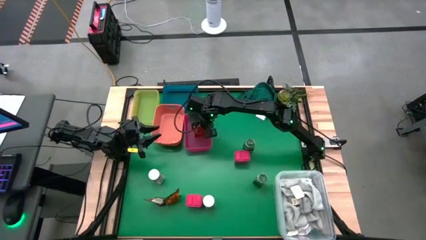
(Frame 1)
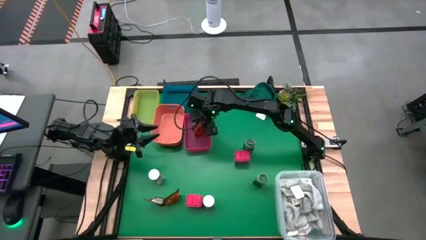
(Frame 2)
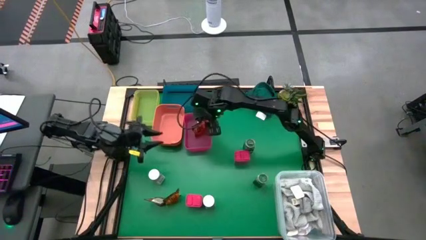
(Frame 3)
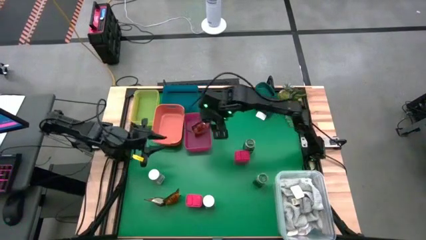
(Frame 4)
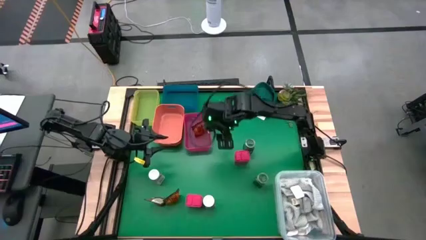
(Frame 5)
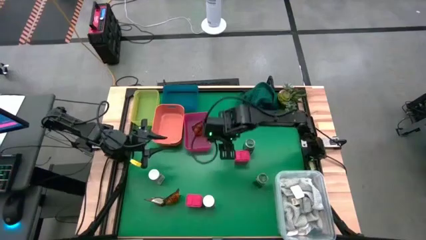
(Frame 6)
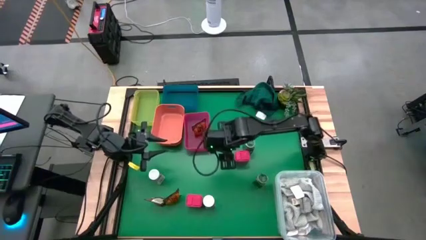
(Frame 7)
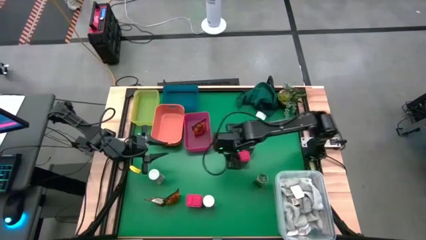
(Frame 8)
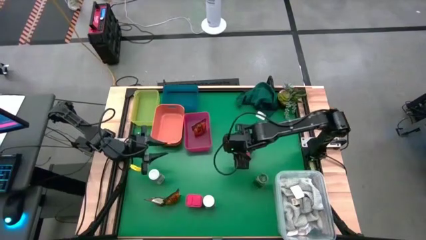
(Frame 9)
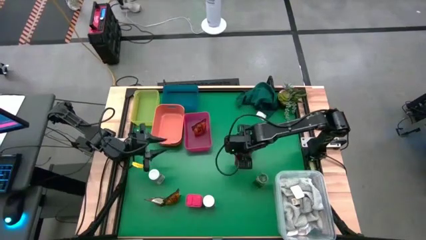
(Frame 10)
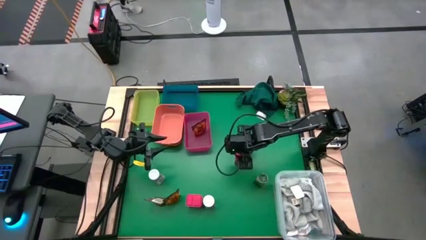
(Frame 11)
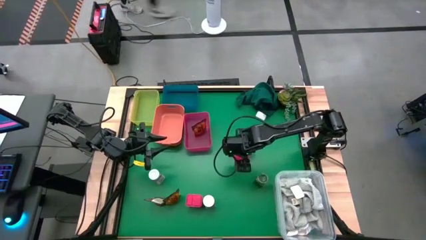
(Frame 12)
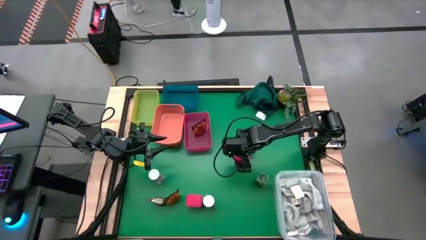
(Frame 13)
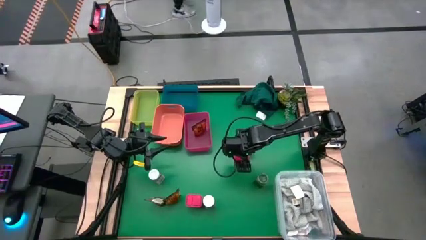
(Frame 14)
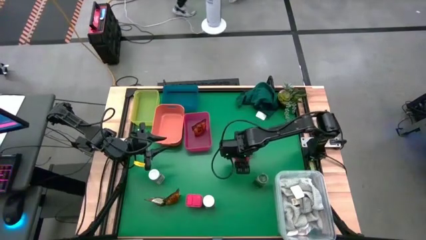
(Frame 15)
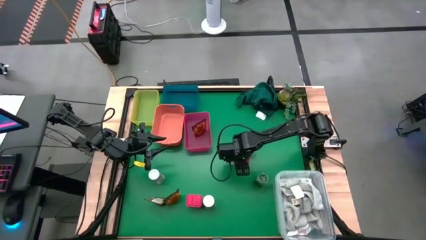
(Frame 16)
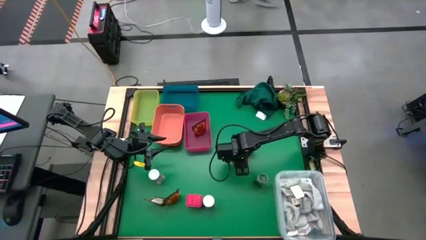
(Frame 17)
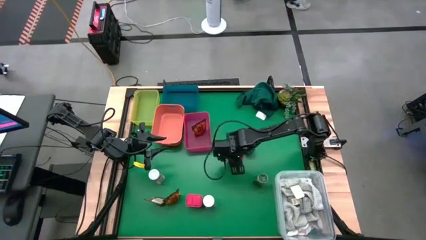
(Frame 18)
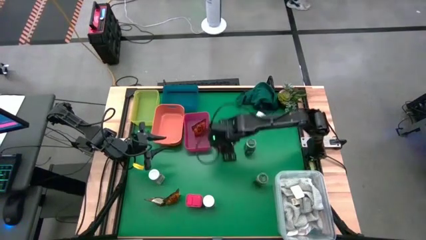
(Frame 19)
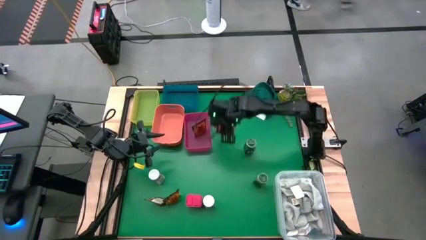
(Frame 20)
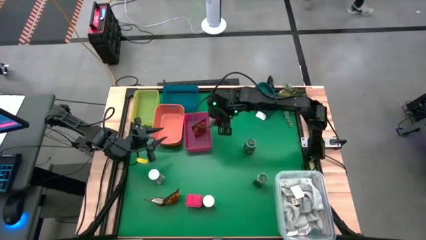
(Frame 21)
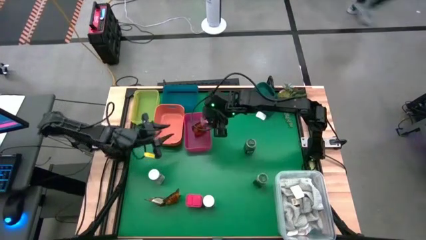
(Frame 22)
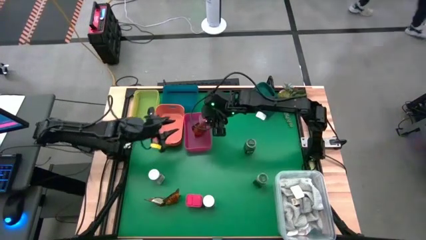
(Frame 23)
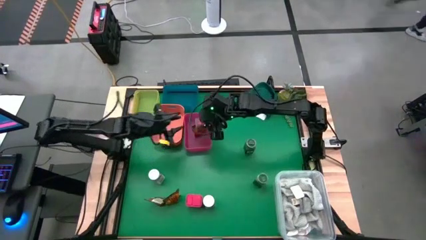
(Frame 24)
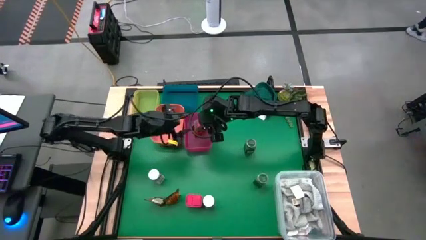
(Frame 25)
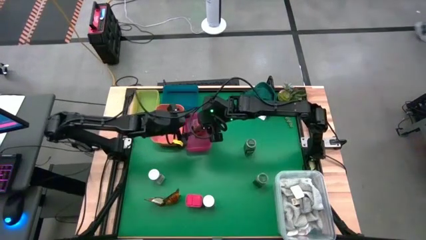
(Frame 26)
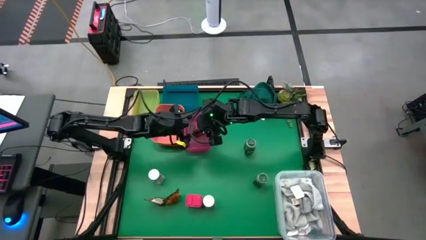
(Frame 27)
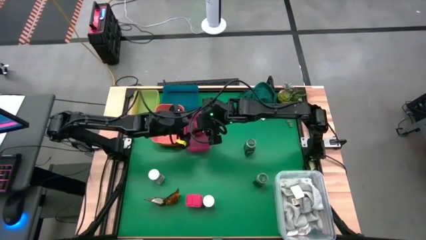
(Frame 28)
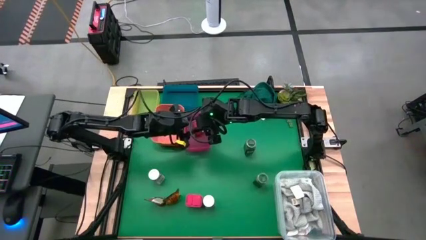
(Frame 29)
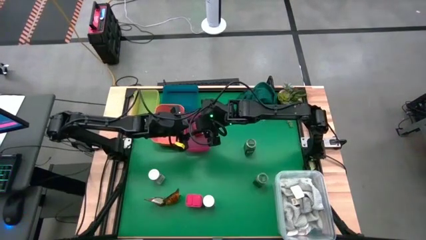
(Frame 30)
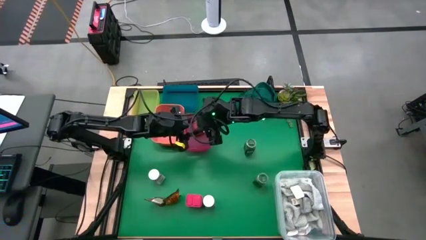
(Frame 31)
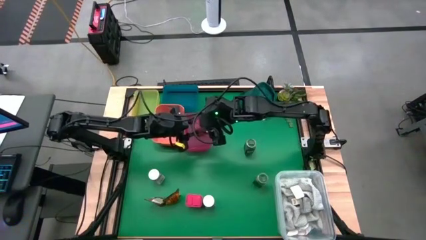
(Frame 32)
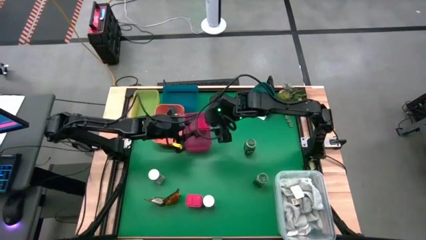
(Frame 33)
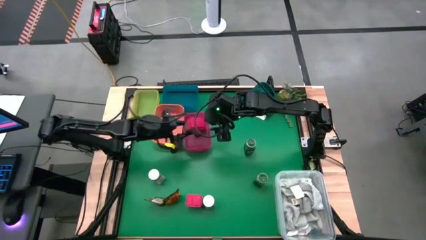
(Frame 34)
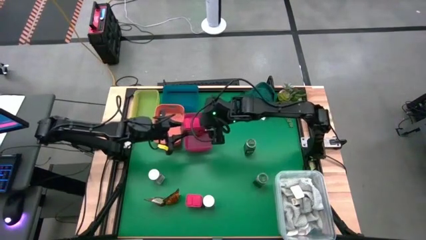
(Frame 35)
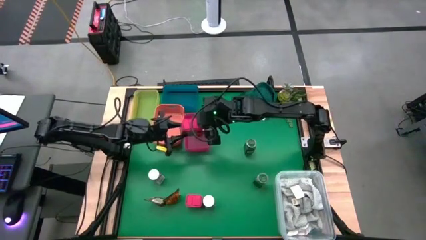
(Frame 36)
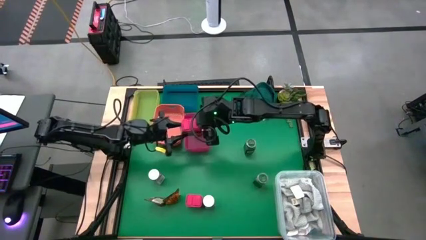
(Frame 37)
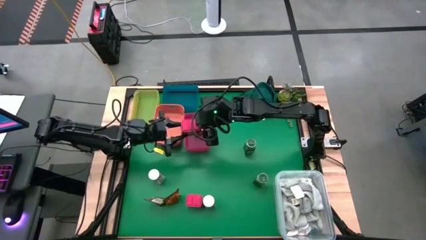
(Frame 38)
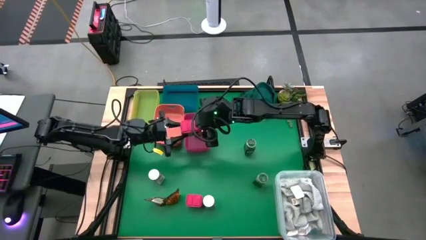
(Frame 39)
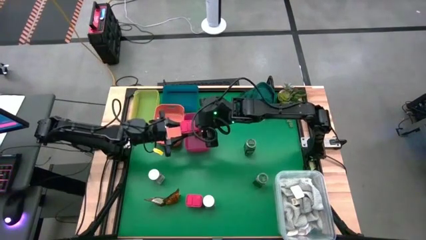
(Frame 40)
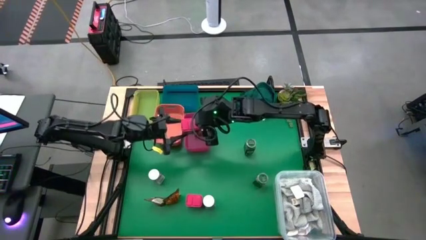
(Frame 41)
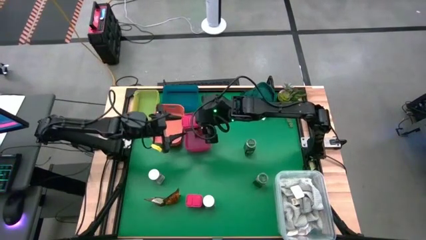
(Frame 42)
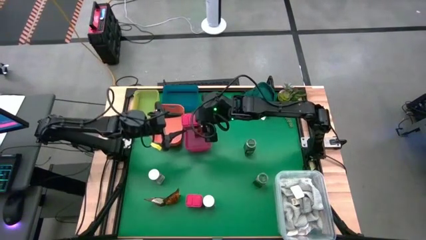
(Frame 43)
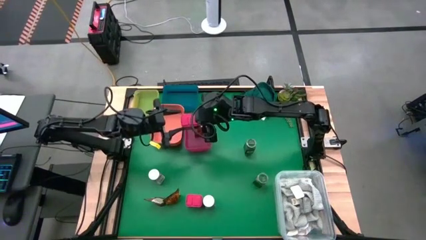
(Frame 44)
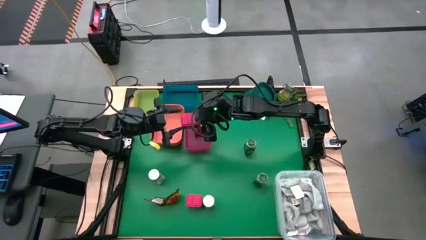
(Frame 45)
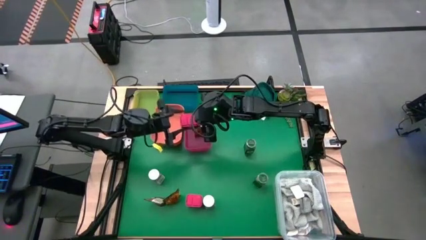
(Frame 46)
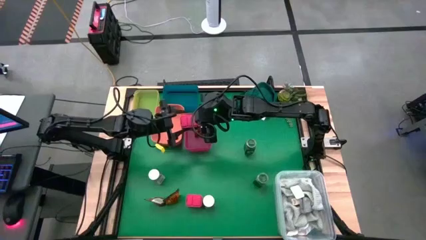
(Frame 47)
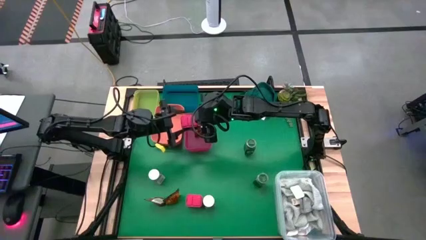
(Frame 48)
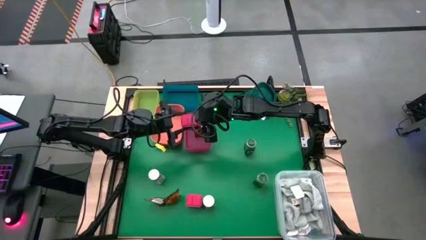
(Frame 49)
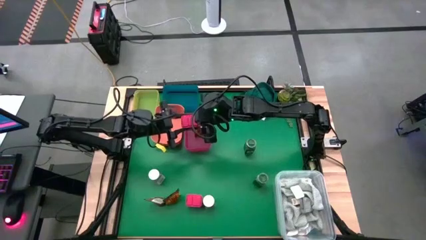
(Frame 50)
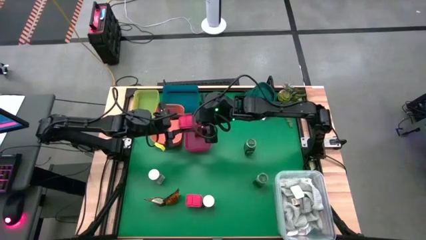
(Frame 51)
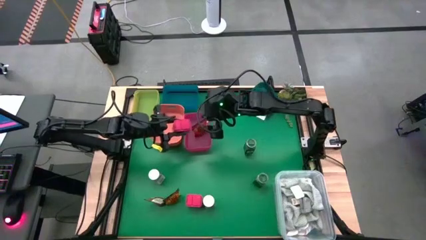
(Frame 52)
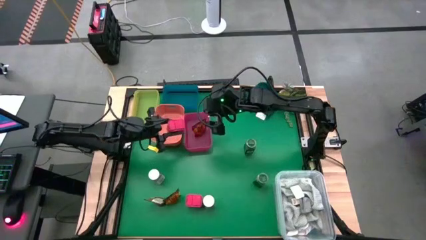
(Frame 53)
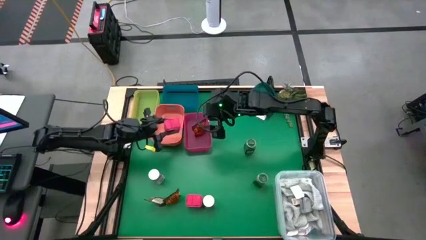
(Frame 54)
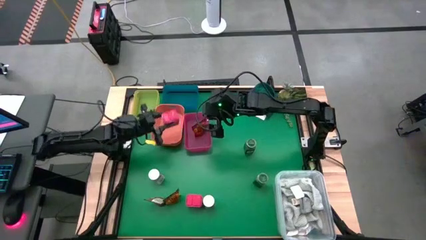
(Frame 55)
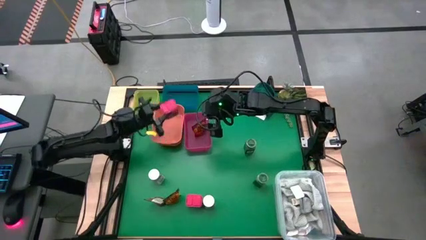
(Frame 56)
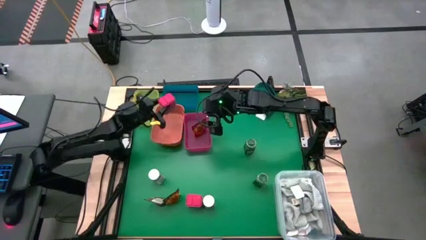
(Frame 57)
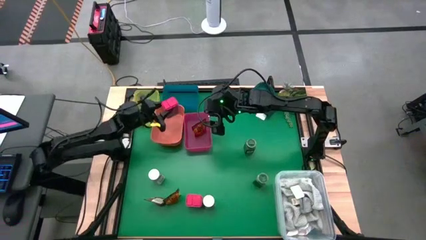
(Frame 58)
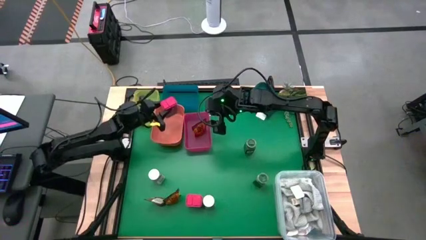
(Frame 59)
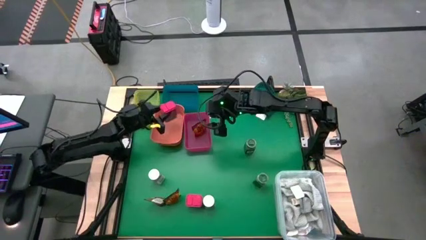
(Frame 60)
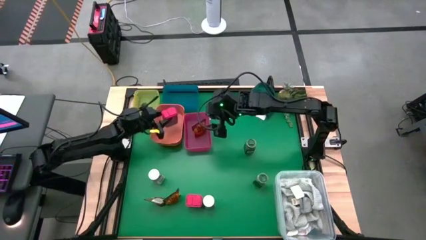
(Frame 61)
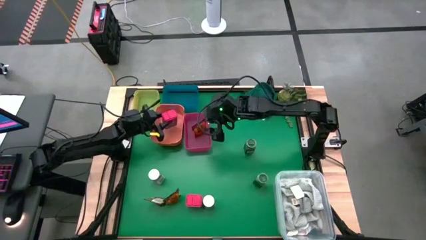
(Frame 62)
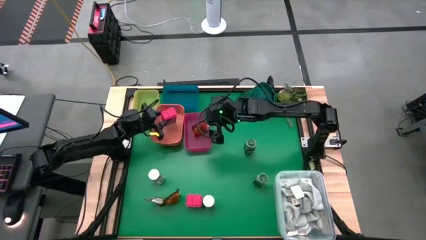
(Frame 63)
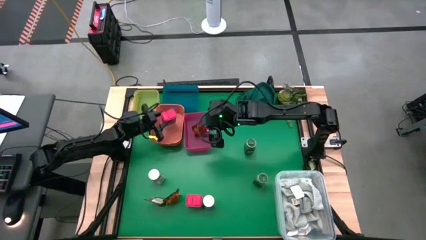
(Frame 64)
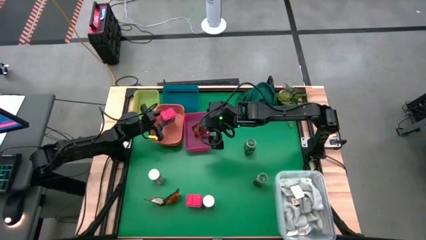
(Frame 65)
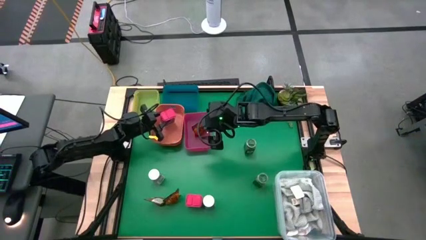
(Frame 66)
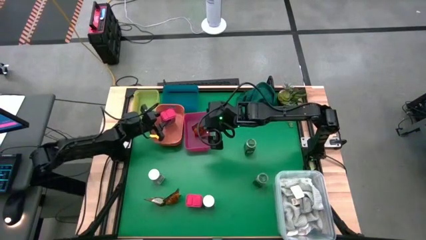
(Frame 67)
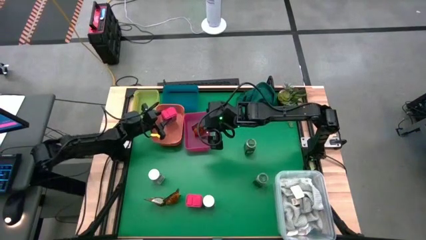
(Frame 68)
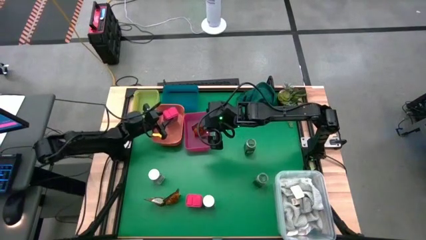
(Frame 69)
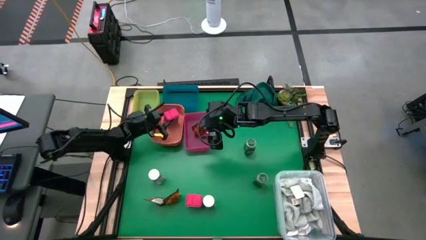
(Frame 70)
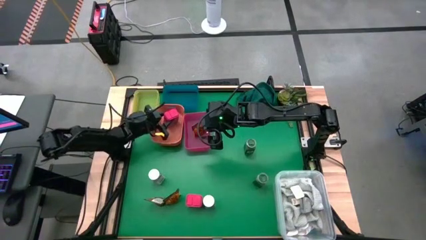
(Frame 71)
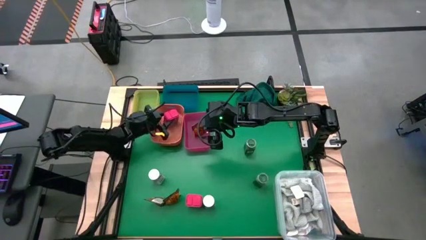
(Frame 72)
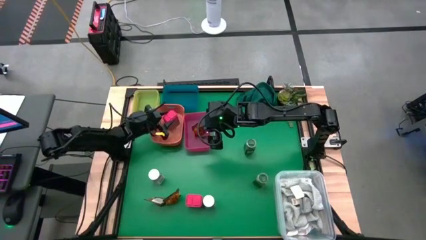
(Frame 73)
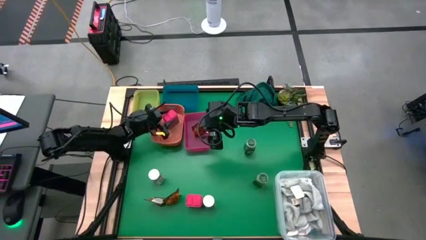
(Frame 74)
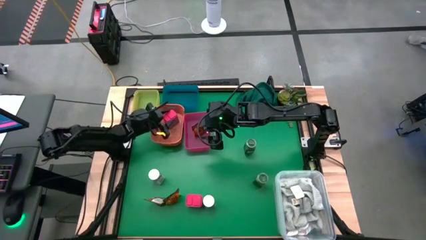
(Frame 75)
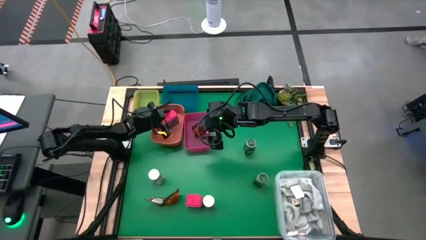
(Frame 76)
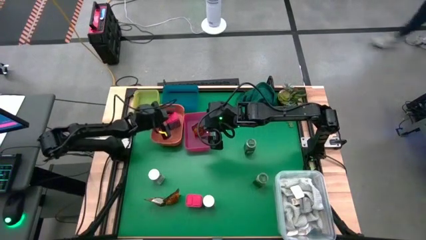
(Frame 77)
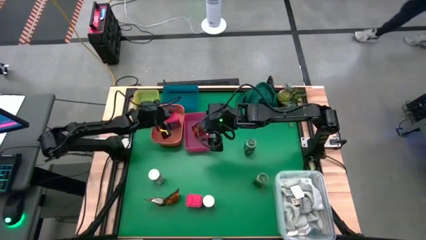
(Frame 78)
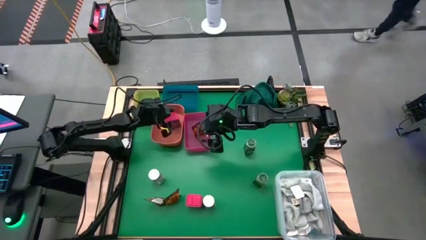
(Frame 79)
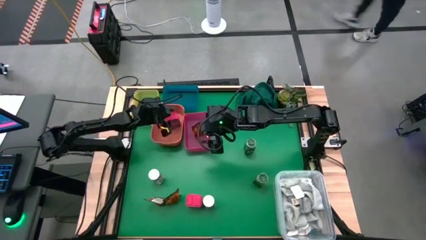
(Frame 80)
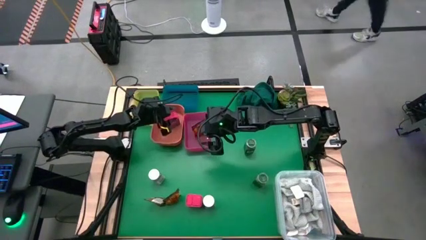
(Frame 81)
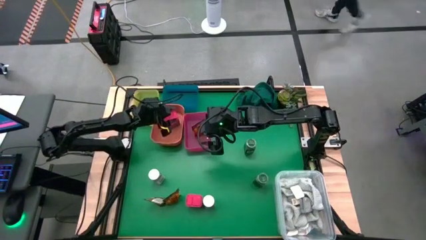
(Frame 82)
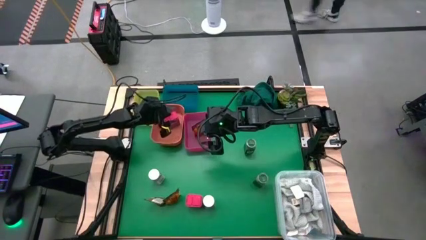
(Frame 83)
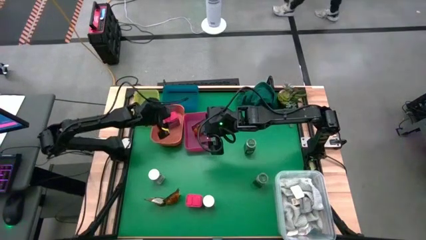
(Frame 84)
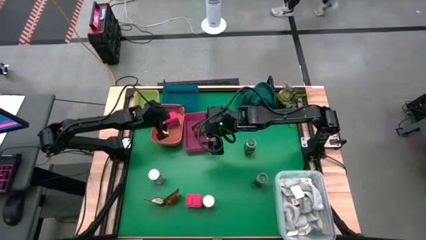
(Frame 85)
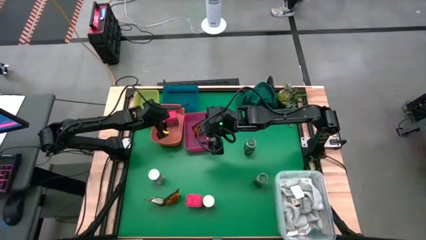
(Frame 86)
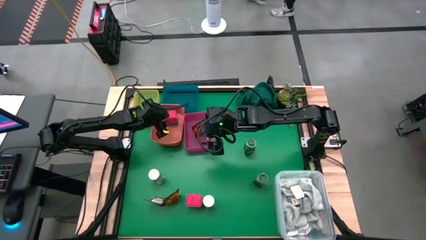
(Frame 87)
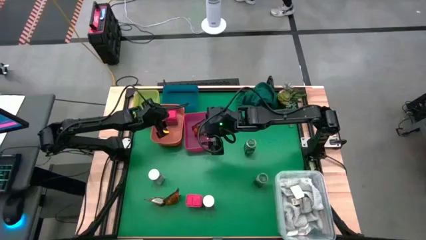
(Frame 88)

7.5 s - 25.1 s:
Task: Sort spices by type
Put the top red seasoning can into the orange bin
